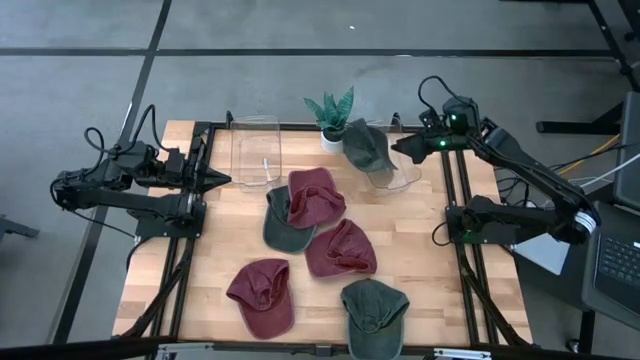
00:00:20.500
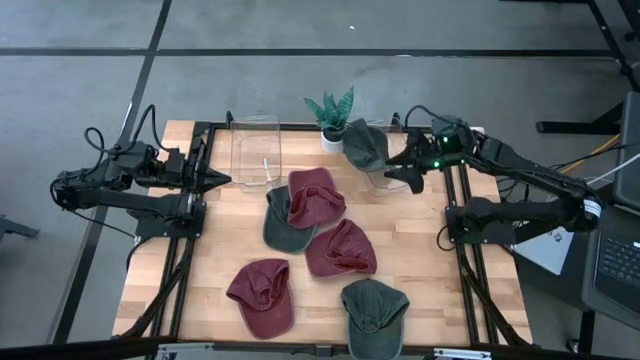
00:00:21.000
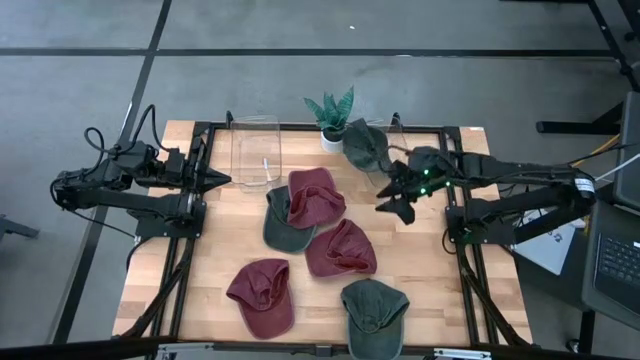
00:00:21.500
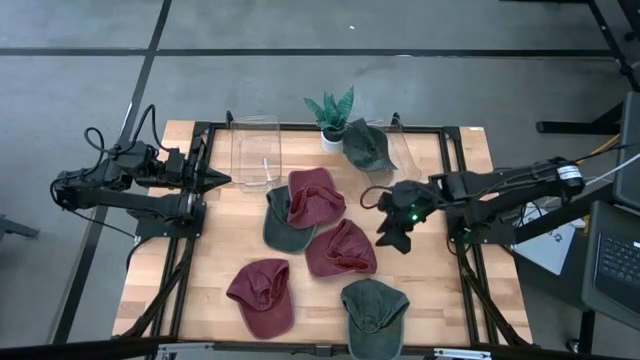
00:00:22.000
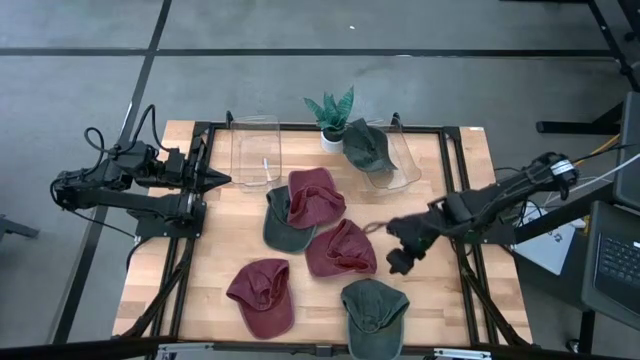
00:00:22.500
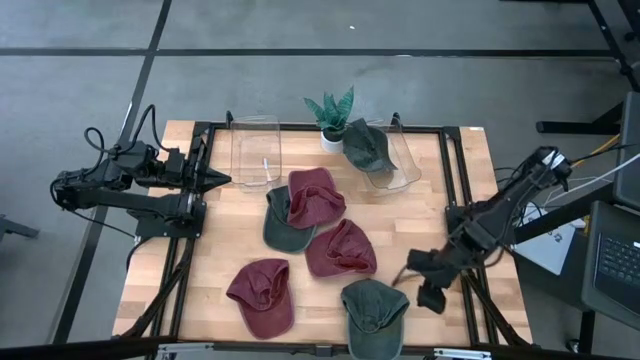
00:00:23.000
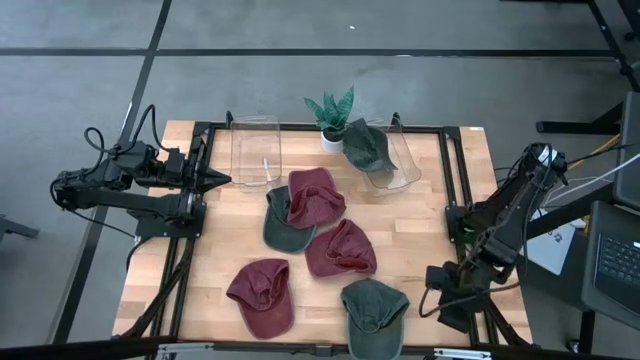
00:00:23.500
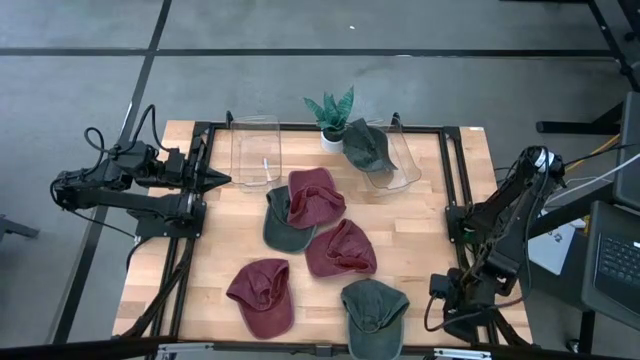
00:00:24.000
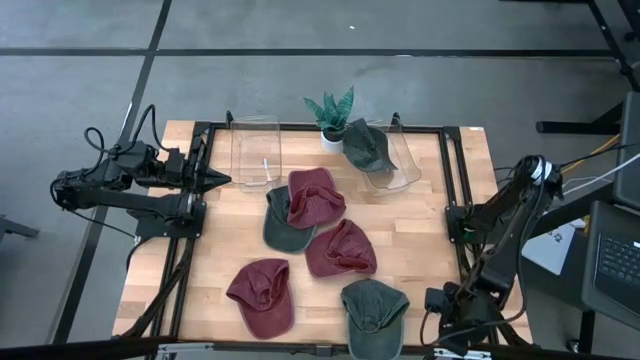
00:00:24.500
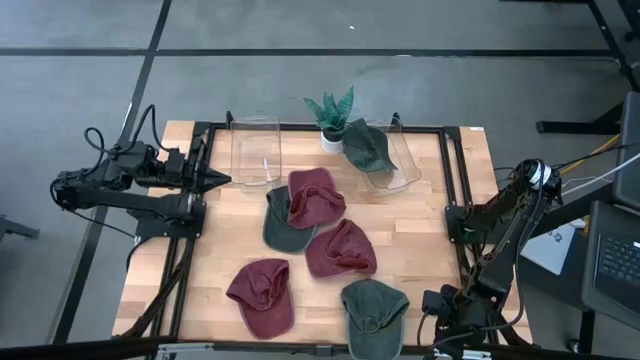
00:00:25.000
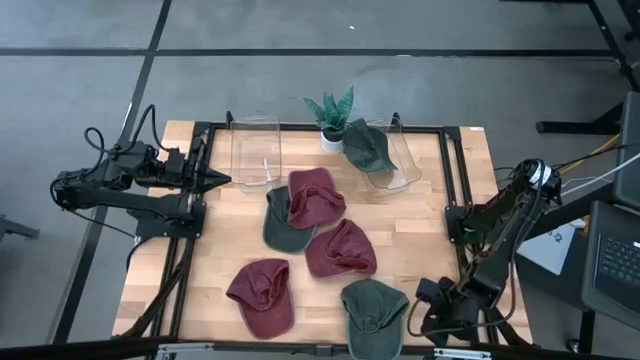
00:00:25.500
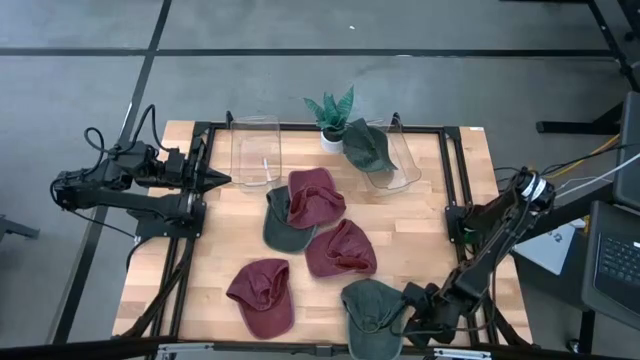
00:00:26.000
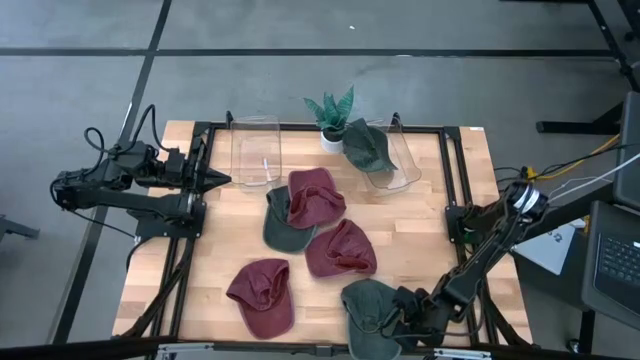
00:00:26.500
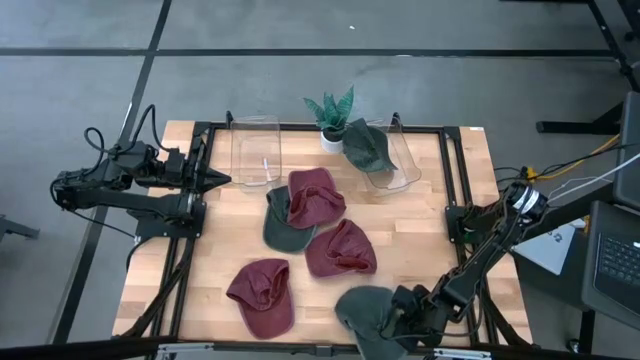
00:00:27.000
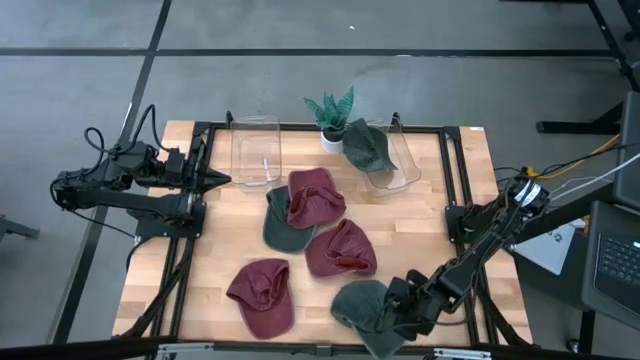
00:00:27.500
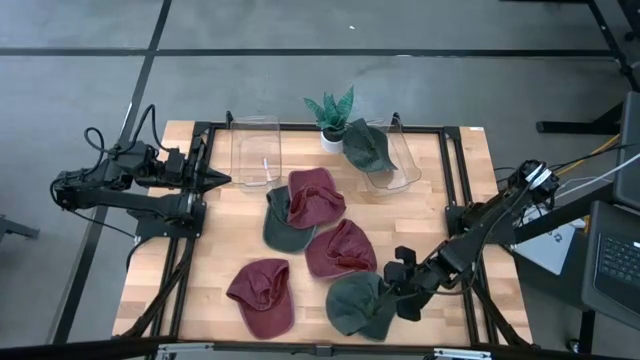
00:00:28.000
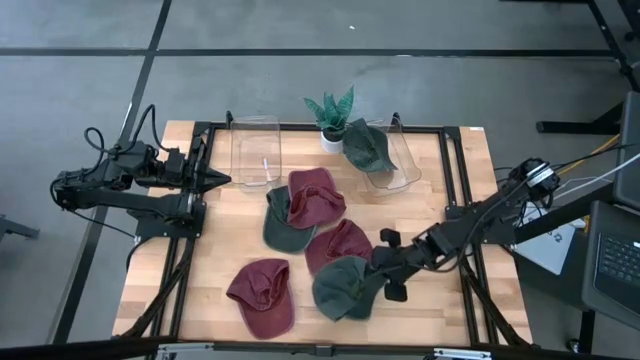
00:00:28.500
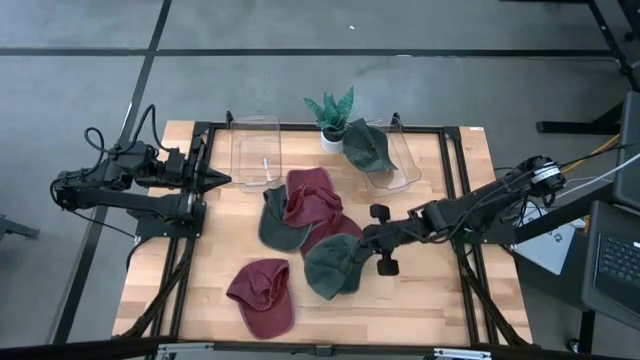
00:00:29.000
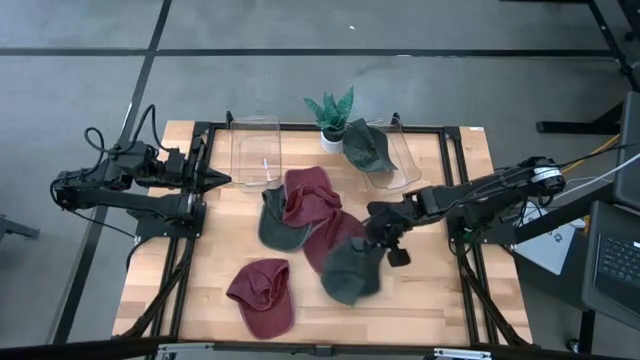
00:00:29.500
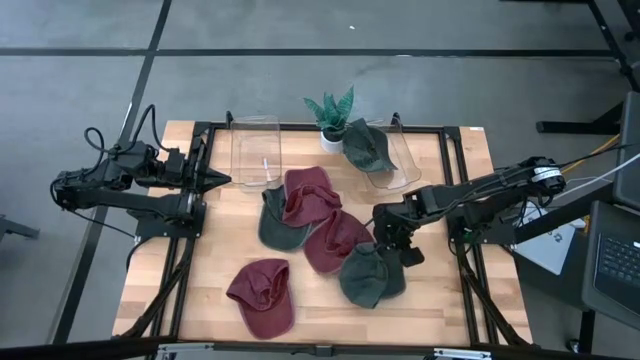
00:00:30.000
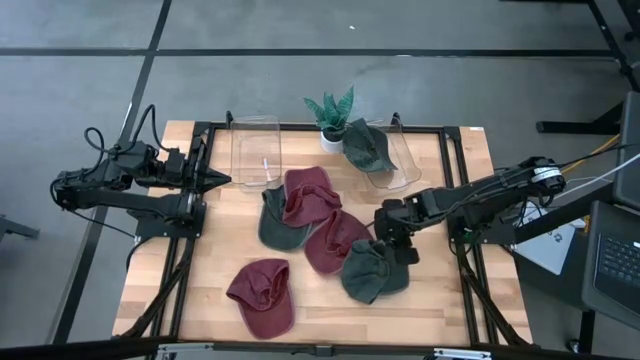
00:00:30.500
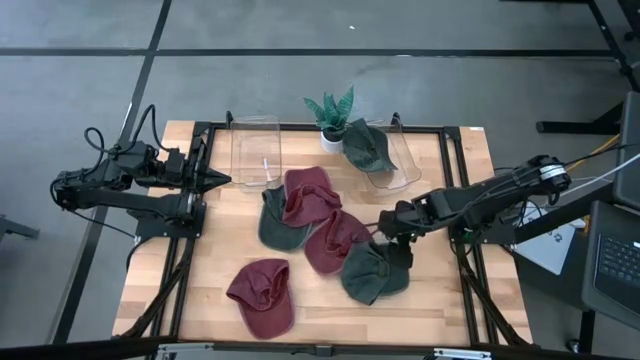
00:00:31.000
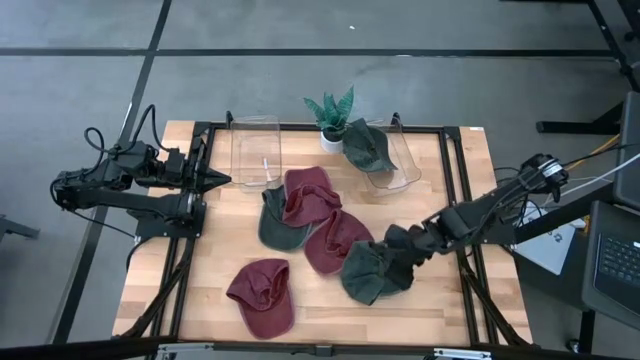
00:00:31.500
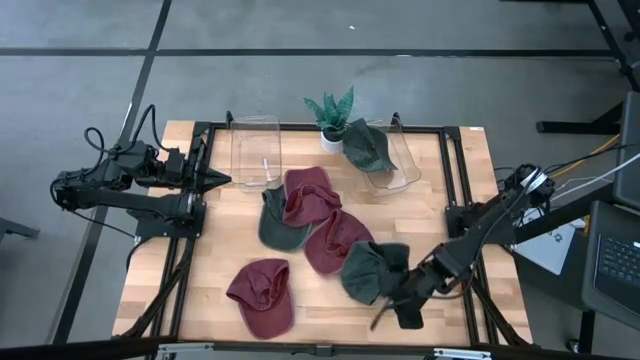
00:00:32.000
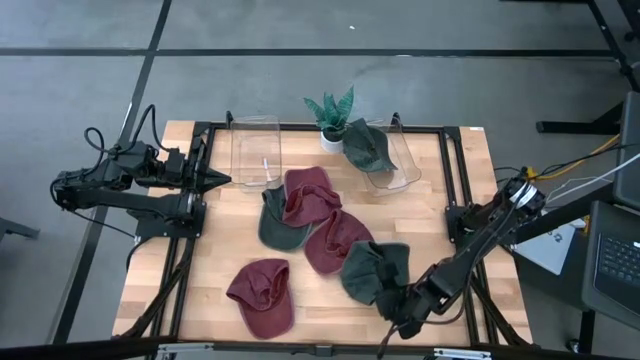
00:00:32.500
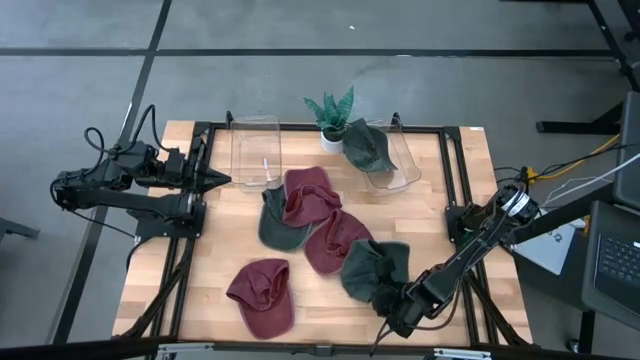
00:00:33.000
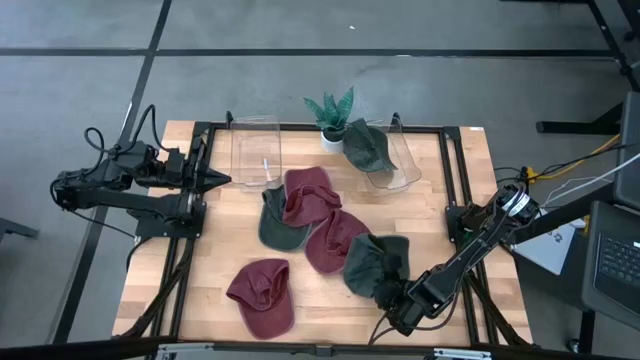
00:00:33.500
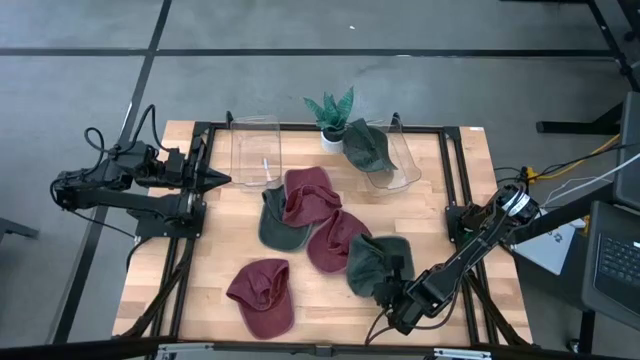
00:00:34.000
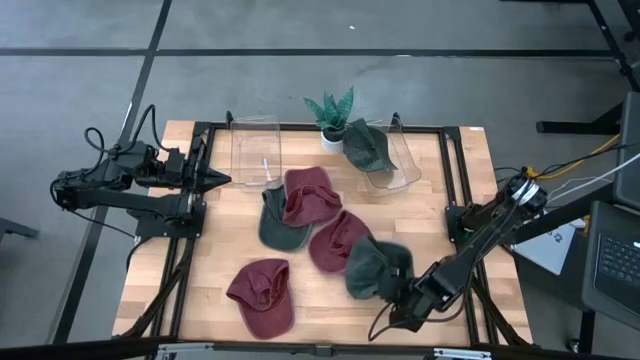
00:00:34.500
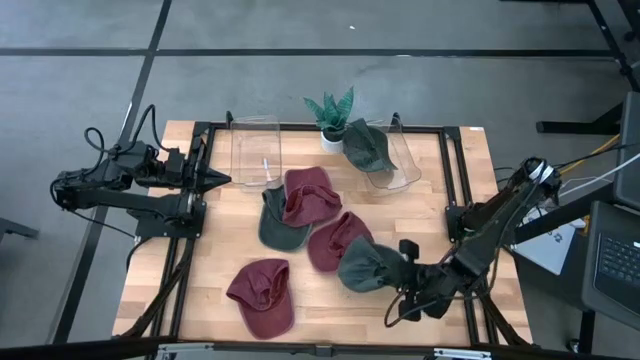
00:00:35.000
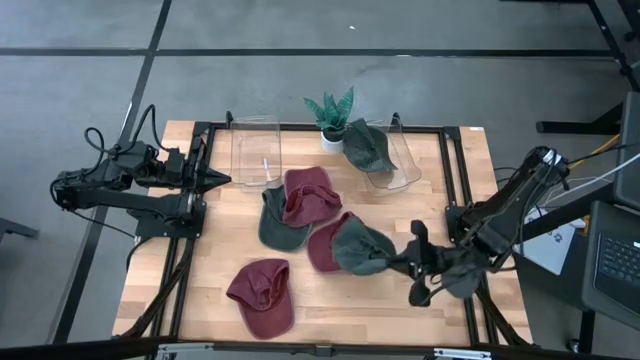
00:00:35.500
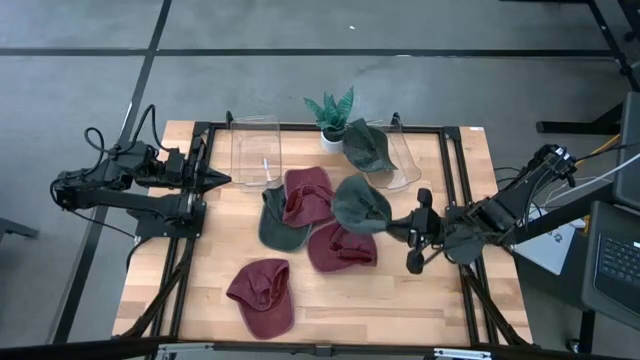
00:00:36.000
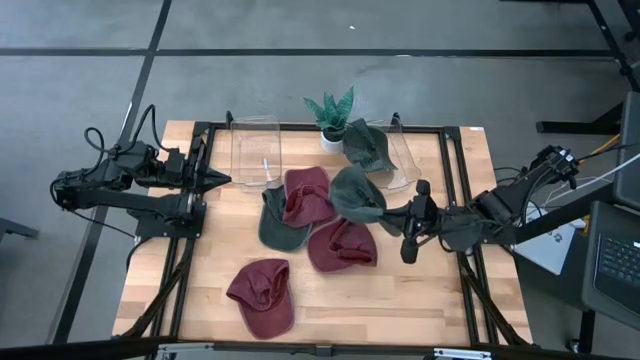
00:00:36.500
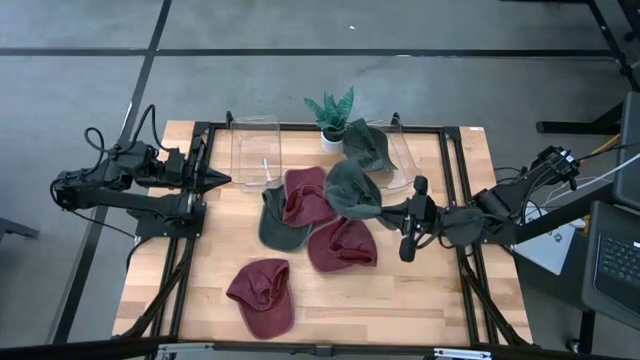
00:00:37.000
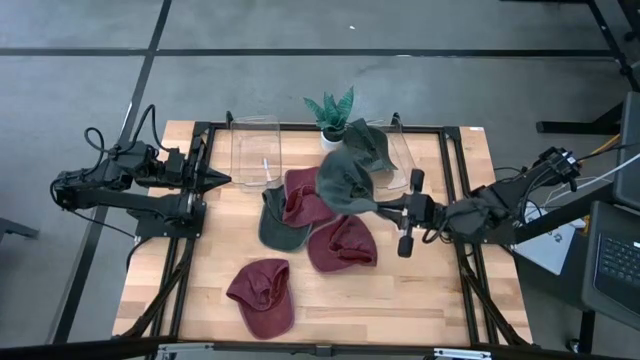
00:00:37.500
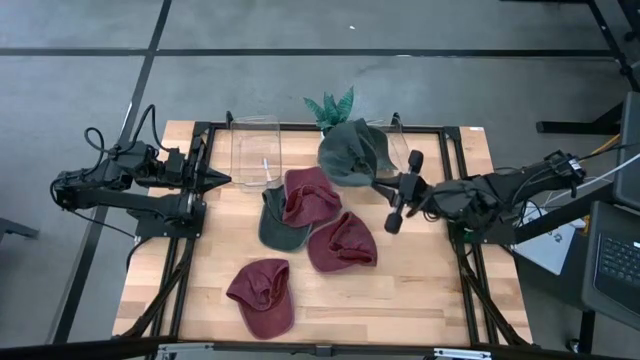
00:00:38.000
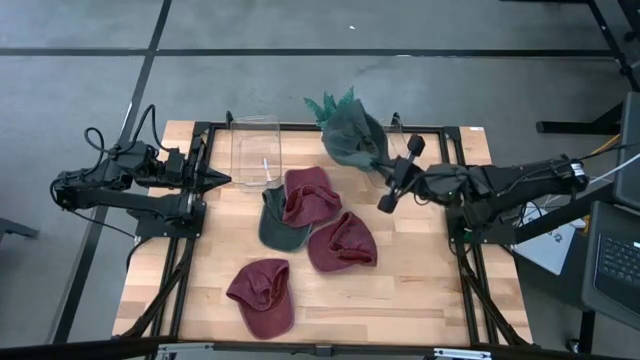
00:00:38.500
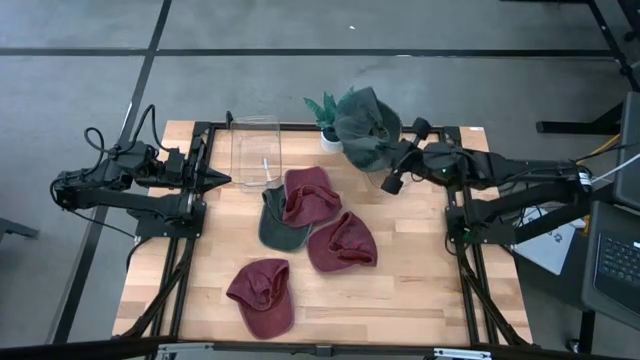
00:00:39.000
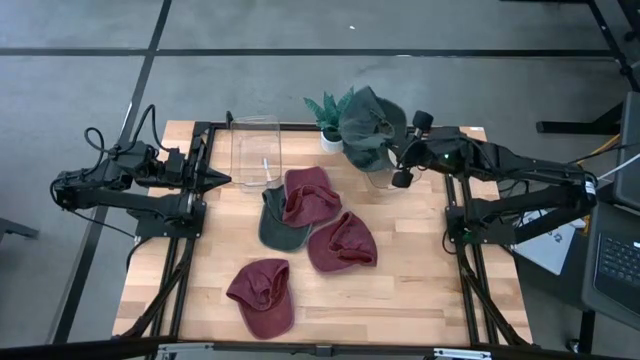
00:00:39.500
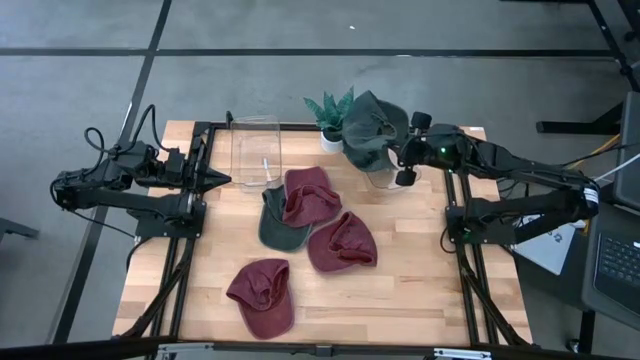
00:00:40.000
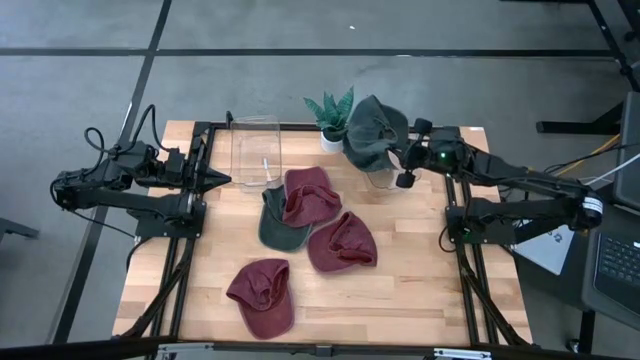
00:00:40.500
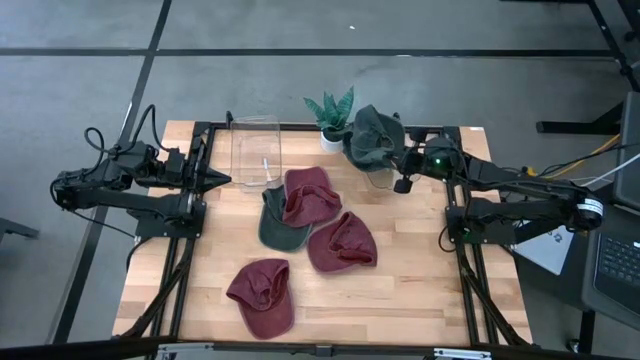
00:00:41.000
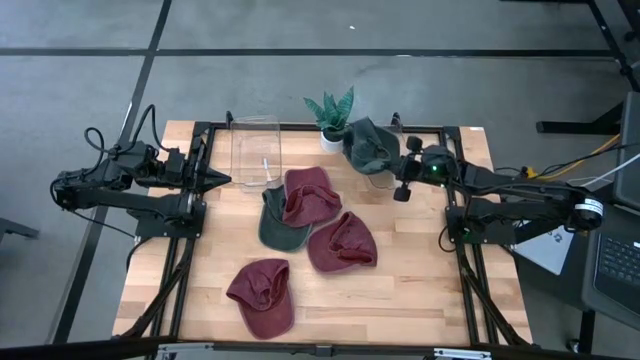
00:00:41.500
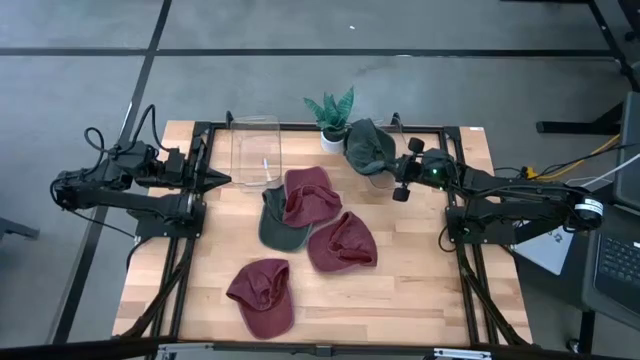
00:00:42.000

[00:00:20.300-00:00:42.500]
Task: Pick & Place hat
Put the bottom gray cap into the right bin
